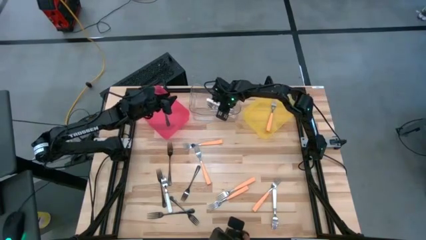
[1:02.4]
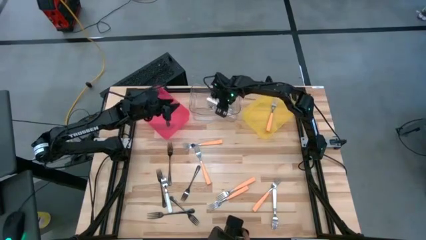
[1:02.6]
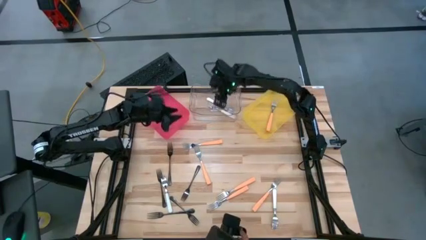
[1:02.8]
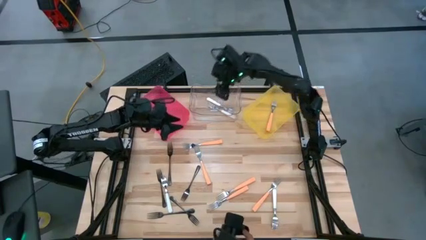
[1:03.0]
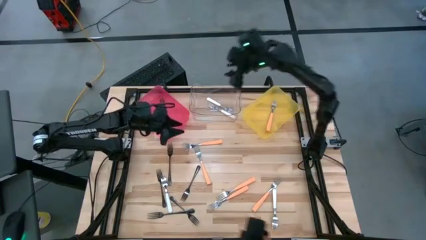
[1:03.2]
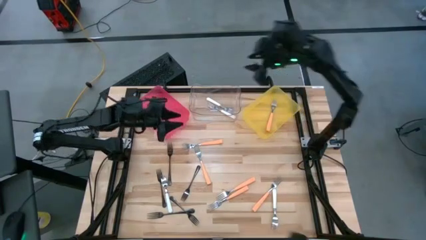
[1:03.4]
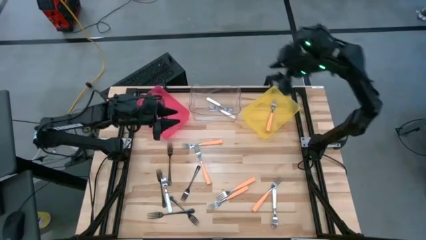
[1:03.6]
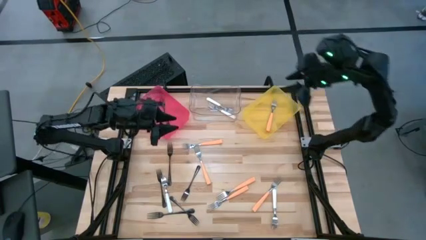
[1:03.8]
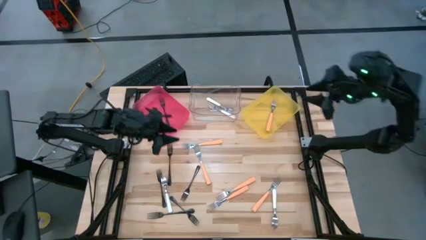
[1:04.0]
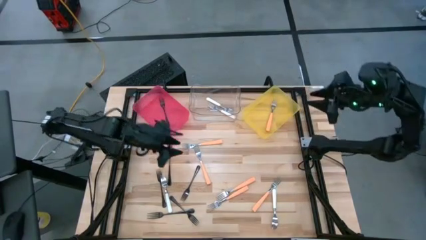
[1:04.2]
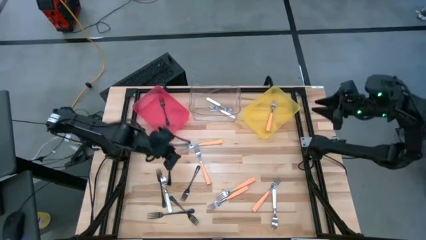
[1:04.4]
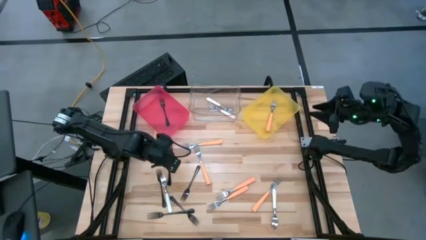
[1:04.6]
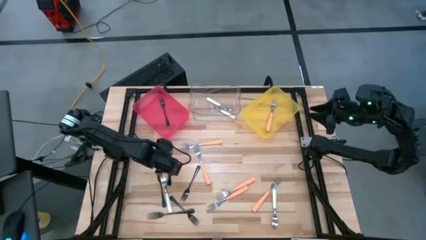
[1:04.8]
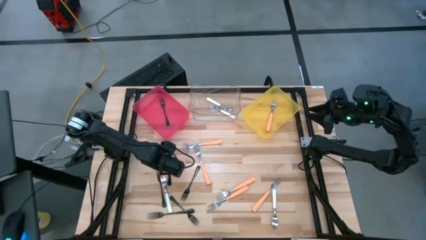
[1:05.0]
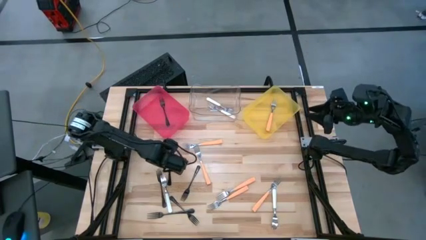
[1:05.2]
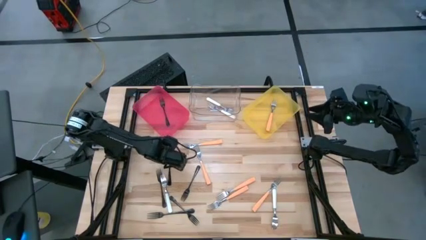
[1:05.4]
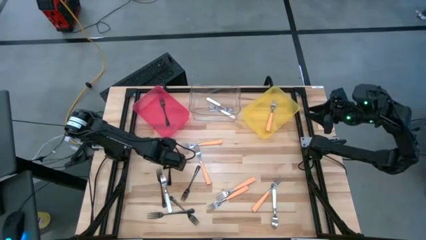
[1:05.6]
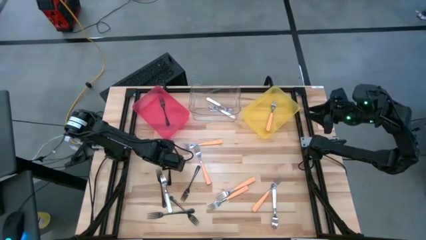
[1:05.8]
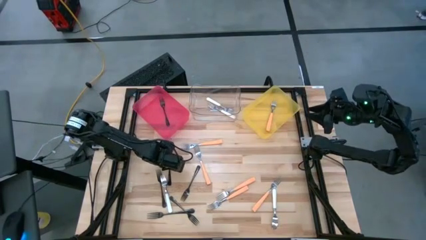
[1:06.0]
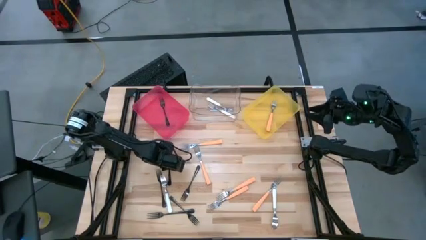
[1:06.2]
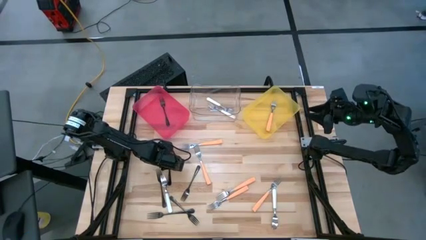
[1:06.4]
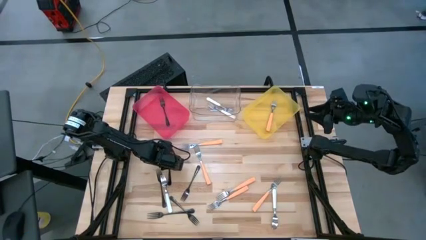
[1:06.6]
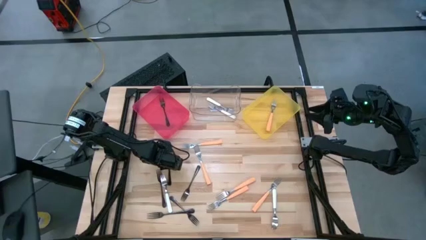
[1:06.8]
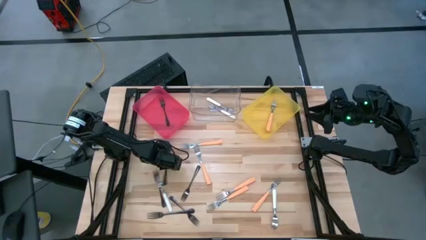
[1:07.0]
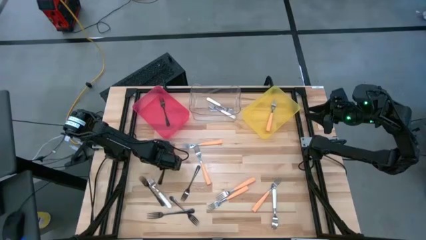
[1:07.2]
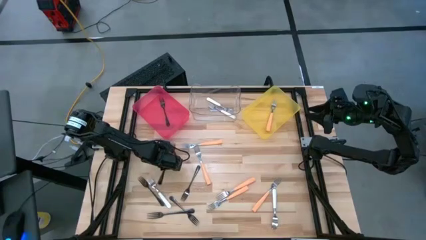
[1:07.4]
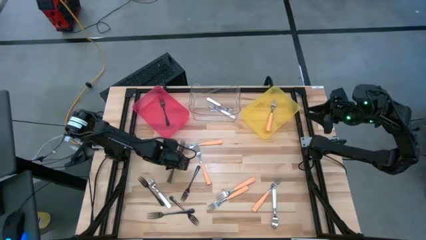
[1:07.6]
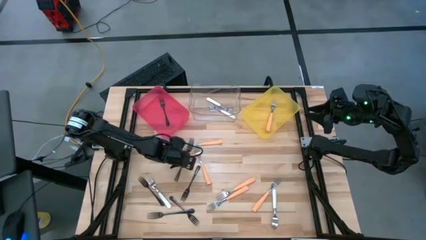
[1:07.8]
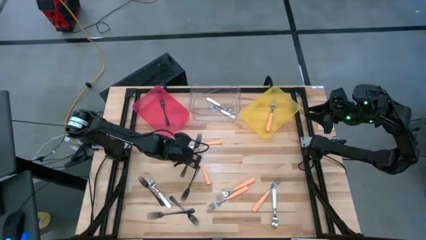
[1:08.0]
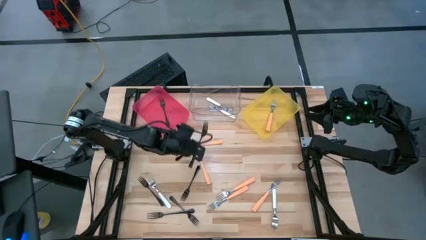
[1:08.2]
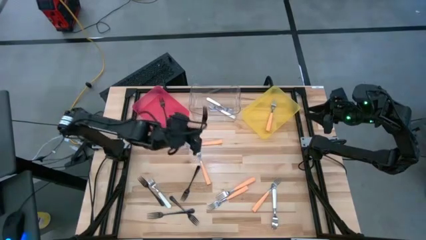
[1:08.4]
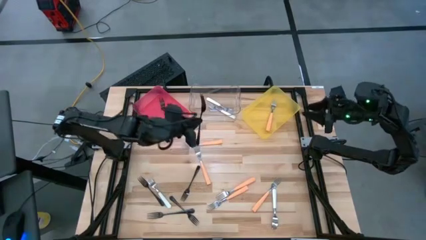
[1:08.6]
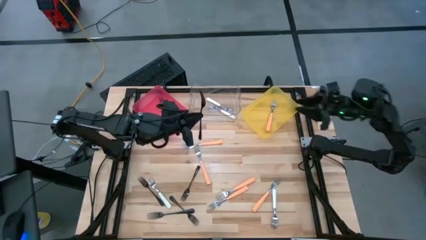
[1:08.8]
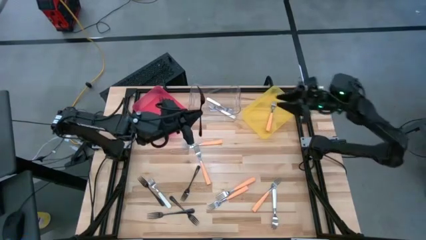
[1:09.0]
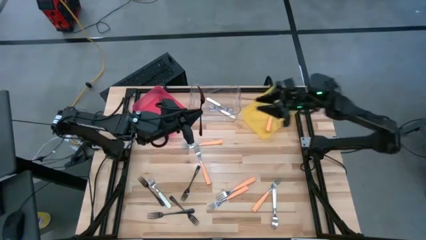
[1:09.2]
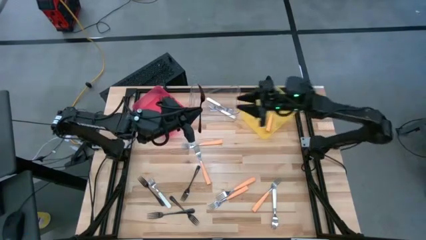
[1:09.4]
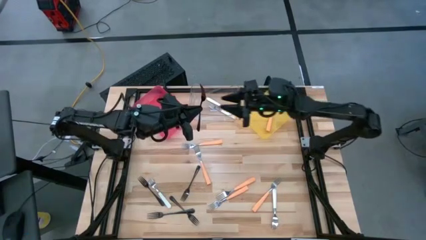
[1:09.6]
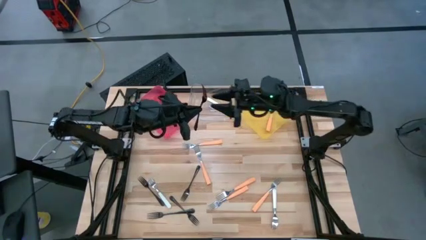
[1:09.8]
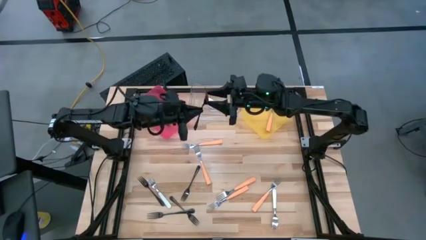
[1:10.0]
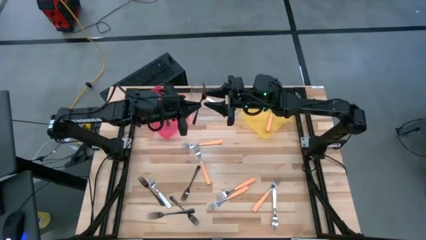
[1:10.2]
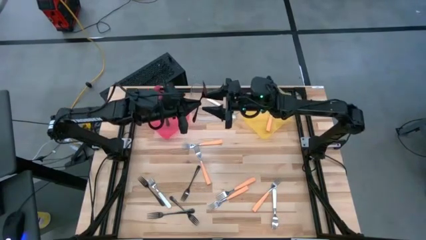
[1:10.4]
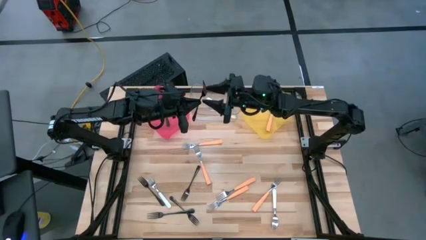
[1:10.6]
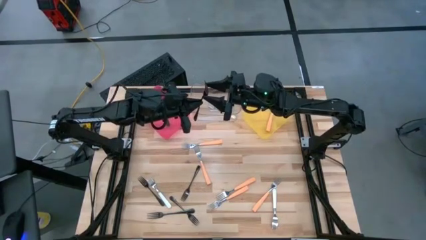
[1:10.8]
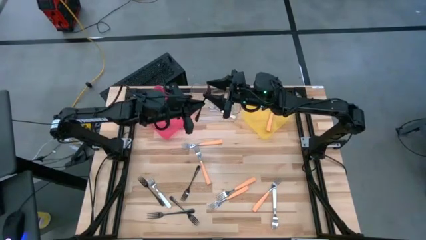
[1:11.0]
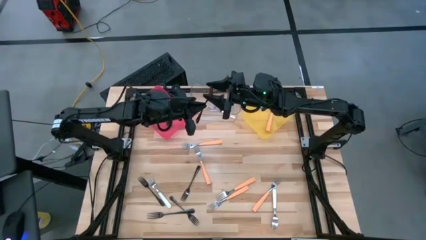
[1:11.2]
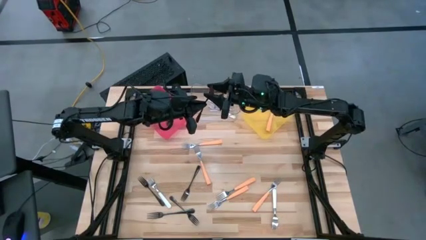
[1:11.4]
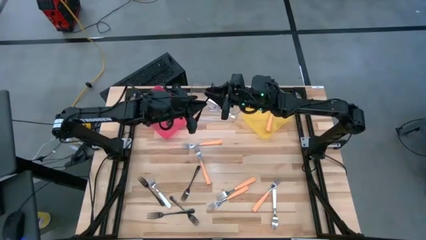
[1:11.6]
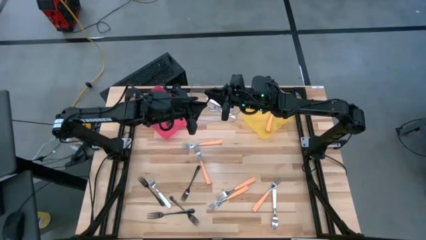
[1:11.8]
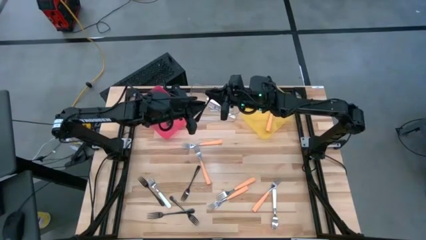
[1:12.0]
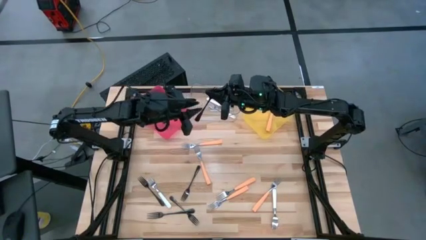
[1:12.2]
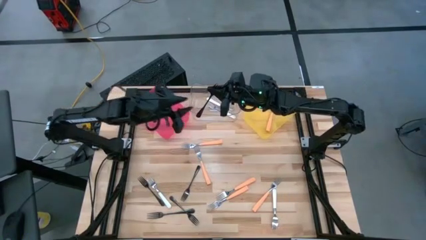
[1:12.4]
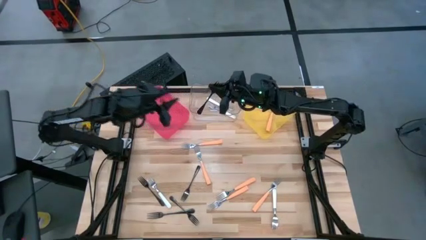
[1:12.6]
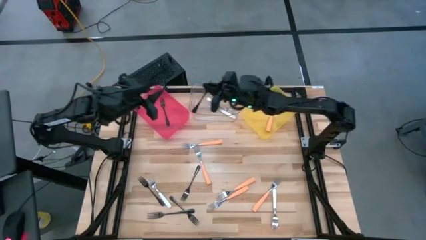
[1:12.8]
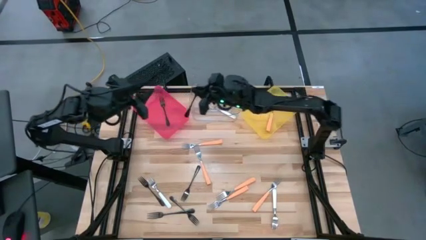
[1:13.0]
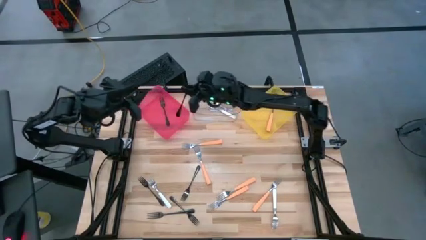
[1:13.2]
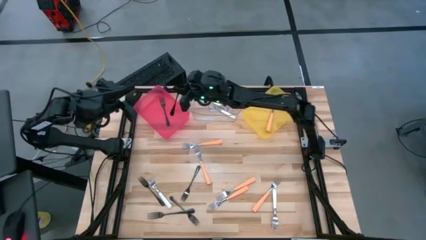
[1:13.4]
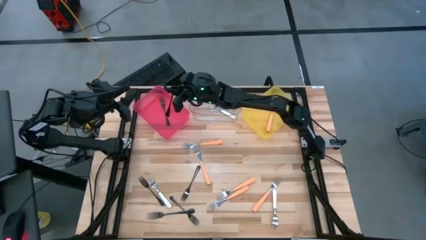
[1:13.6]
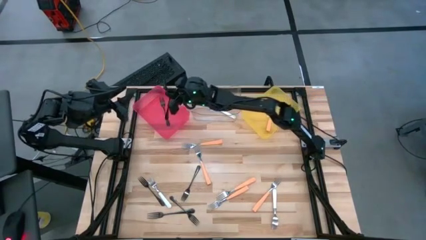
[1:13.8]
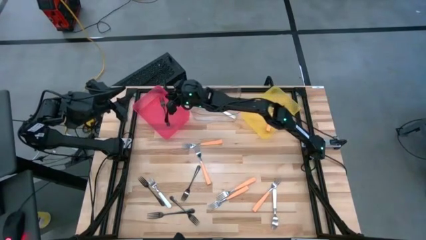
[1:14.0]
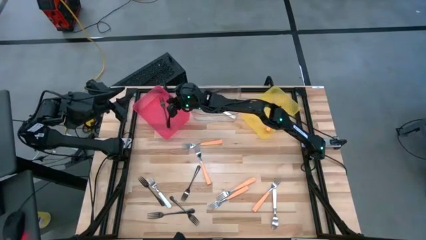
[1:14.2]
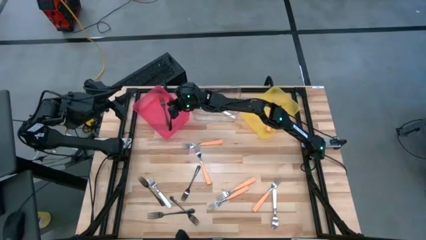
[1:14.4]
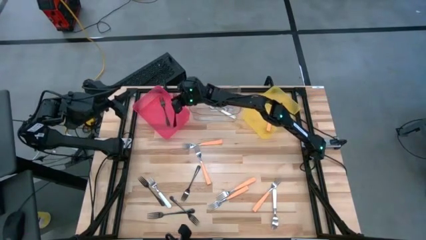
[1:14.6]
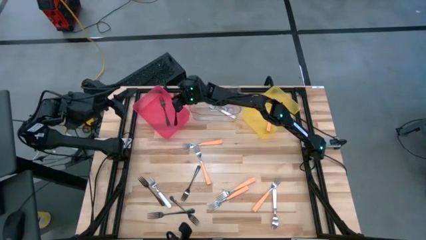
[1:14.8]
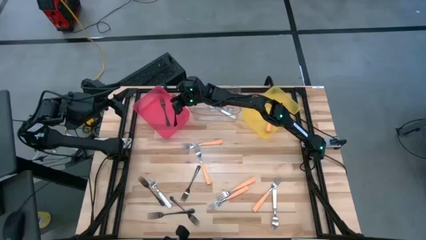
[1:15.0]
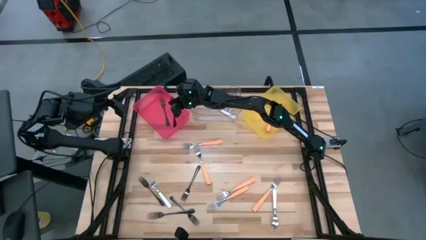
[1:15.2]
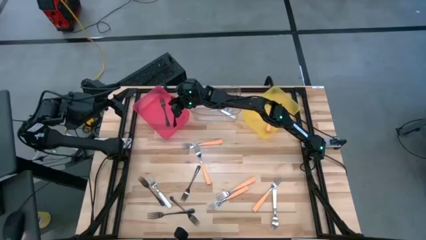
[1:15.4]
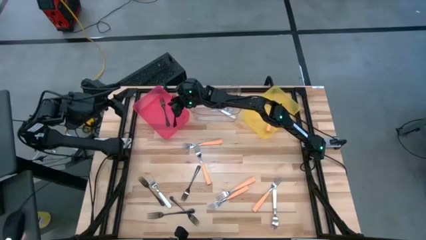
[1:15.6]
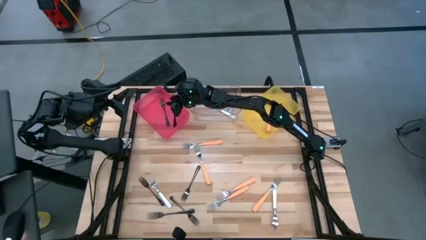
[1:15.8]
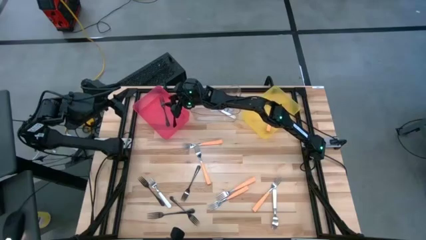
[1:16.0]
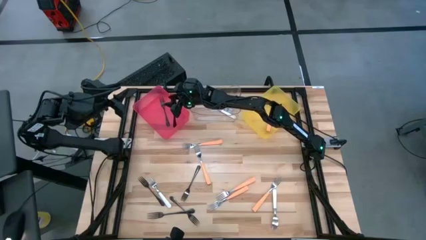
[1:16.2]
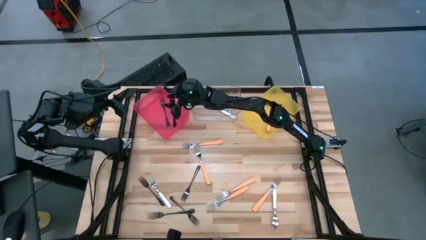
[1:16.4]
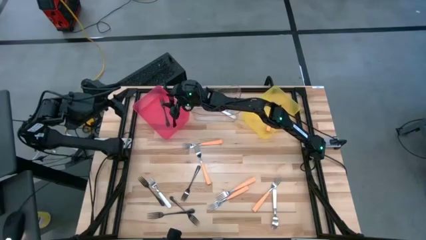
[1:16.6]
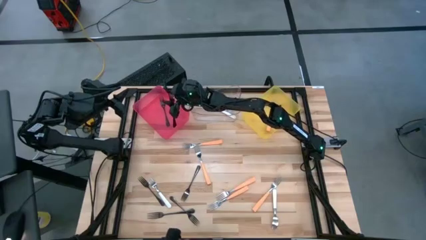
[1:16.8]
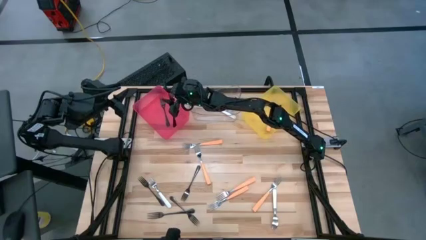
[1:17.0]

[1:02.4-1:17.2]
Task: Sort silverware by color (type)
Put the black fork into the pink bin
